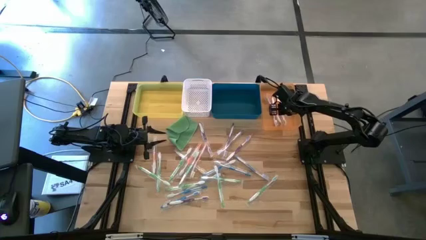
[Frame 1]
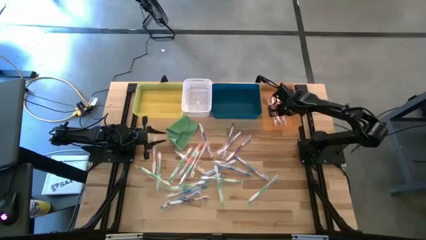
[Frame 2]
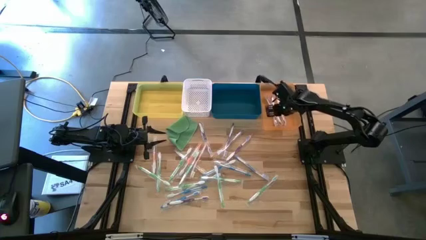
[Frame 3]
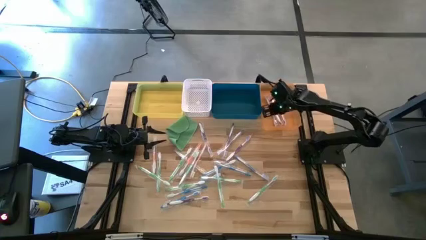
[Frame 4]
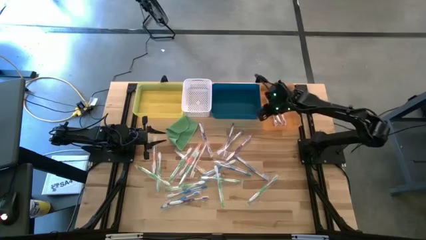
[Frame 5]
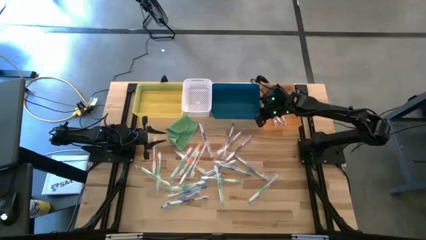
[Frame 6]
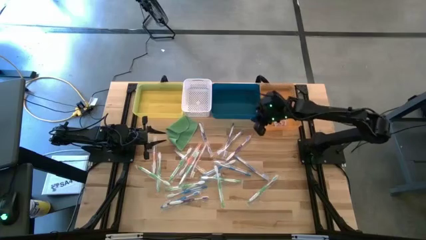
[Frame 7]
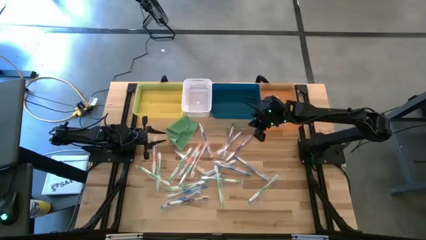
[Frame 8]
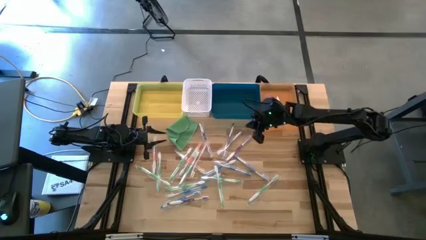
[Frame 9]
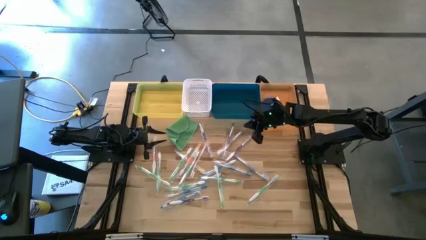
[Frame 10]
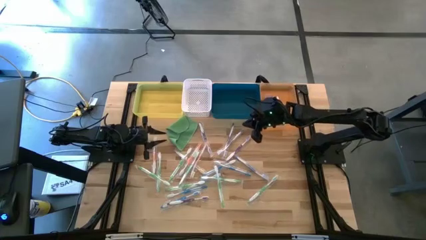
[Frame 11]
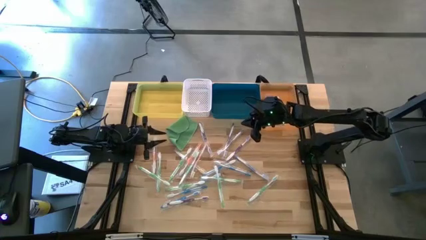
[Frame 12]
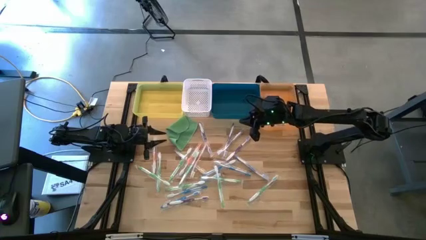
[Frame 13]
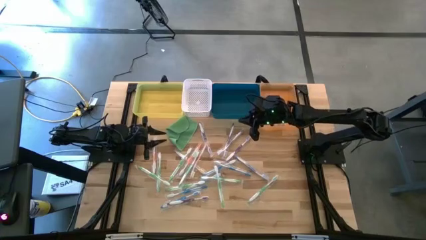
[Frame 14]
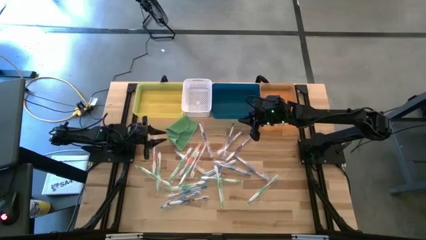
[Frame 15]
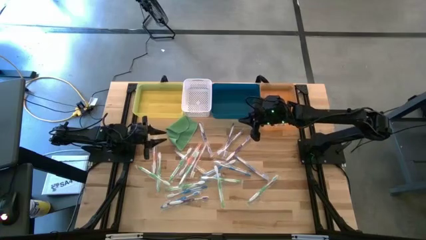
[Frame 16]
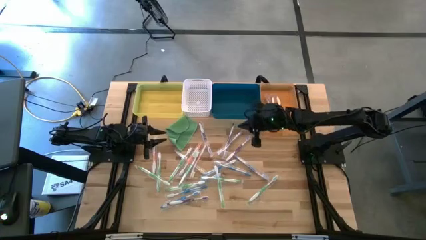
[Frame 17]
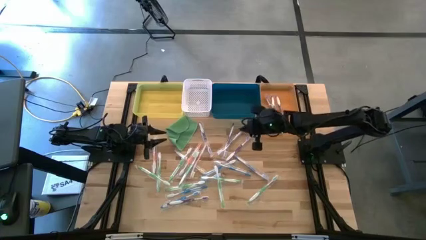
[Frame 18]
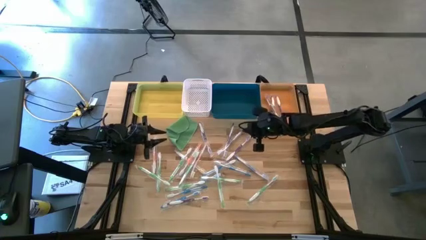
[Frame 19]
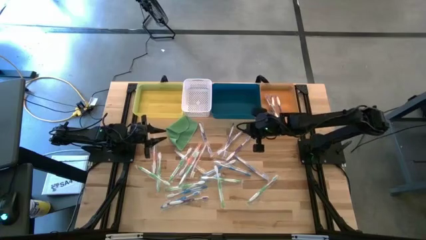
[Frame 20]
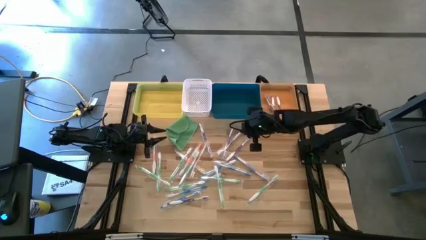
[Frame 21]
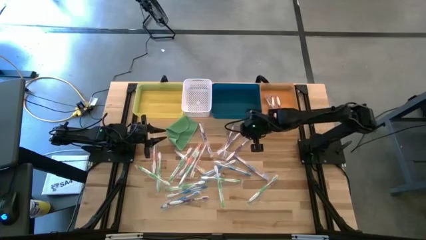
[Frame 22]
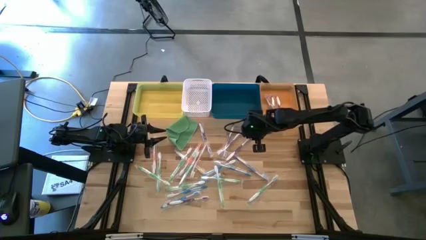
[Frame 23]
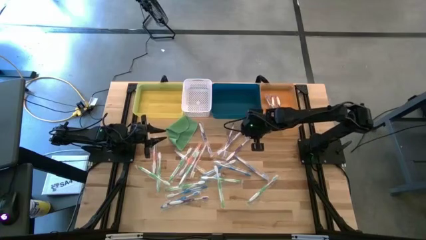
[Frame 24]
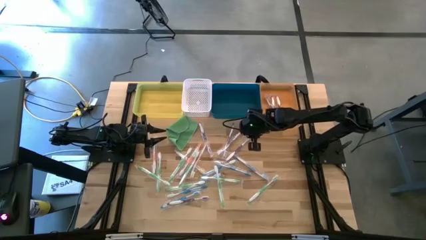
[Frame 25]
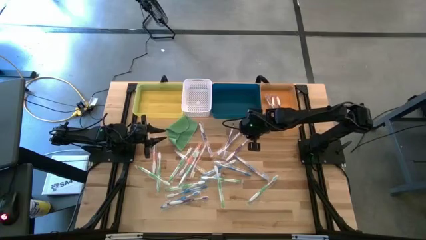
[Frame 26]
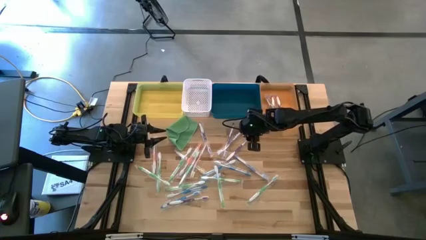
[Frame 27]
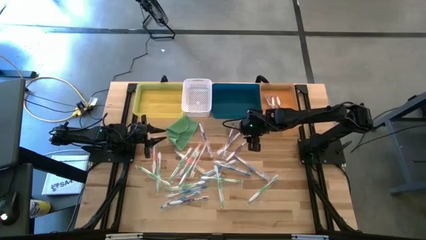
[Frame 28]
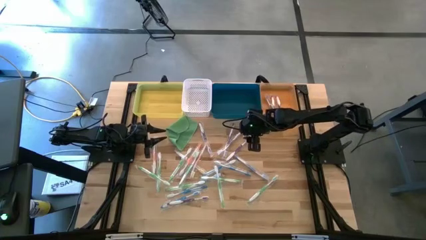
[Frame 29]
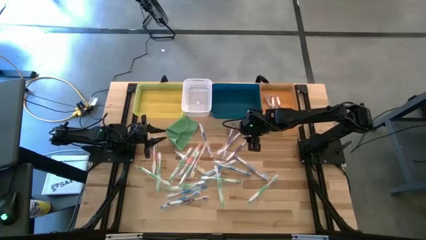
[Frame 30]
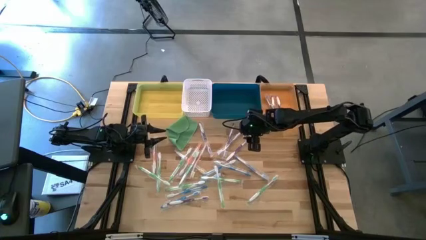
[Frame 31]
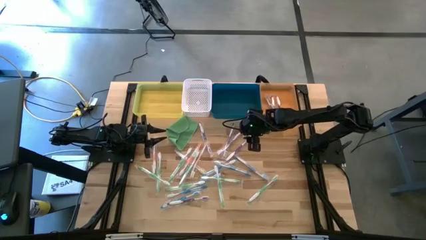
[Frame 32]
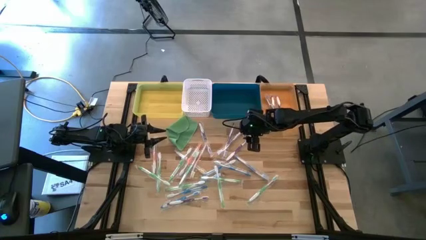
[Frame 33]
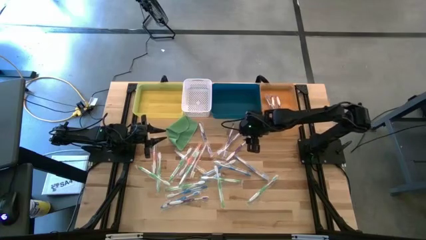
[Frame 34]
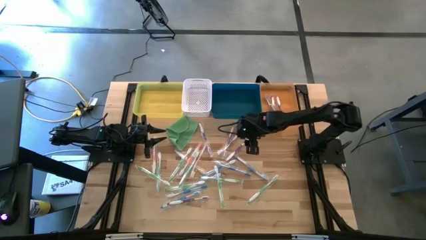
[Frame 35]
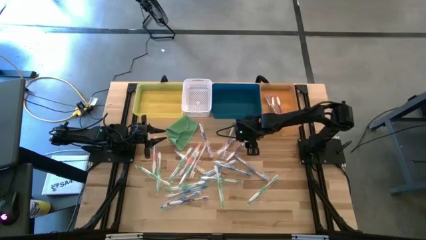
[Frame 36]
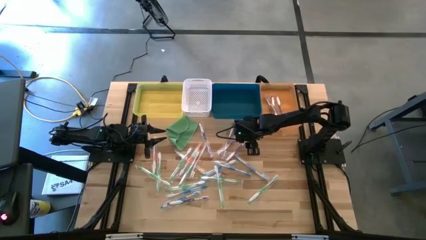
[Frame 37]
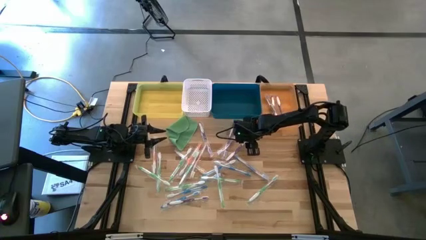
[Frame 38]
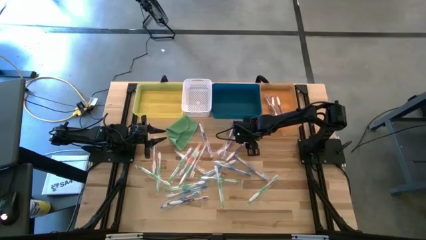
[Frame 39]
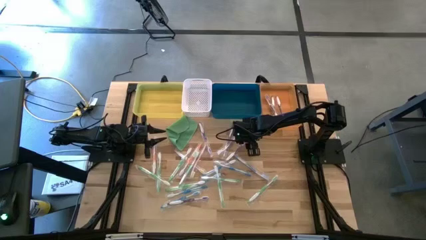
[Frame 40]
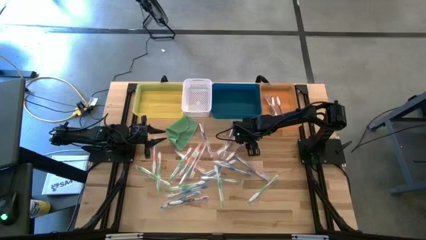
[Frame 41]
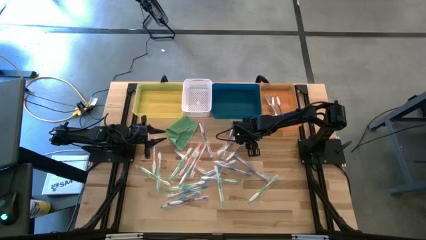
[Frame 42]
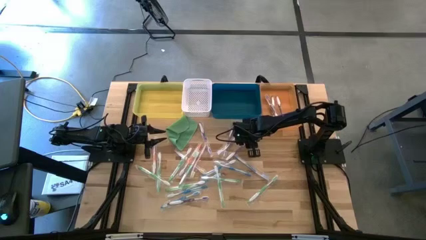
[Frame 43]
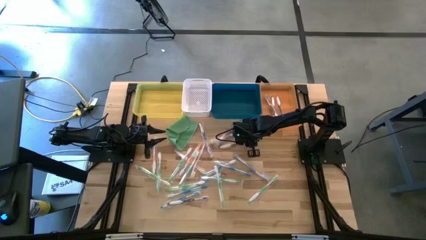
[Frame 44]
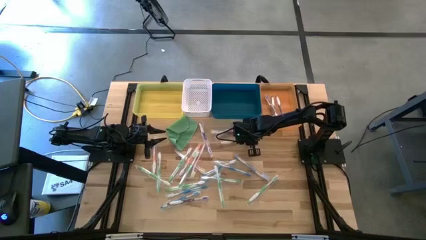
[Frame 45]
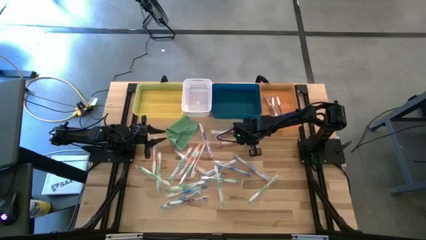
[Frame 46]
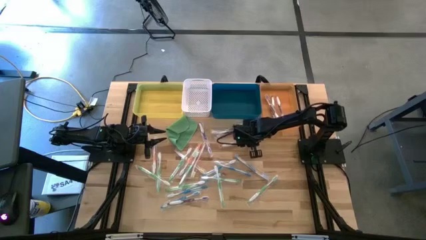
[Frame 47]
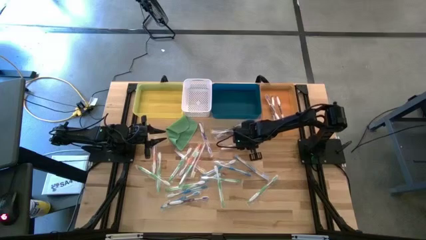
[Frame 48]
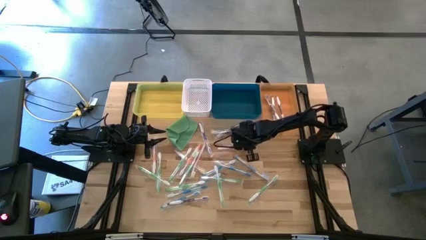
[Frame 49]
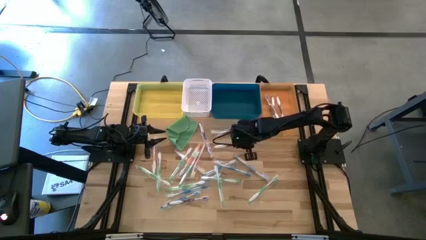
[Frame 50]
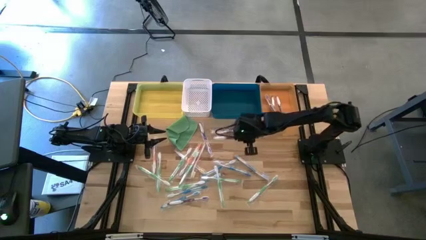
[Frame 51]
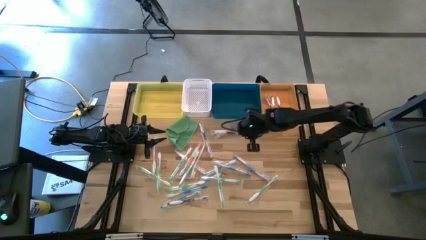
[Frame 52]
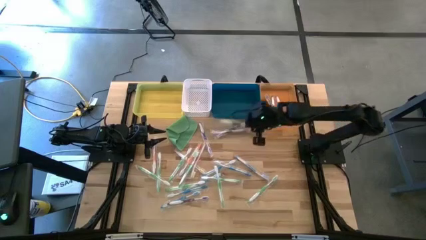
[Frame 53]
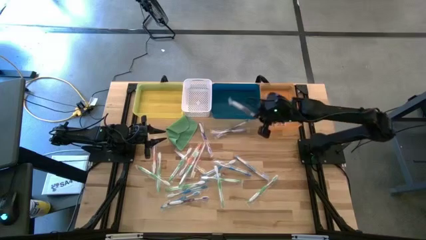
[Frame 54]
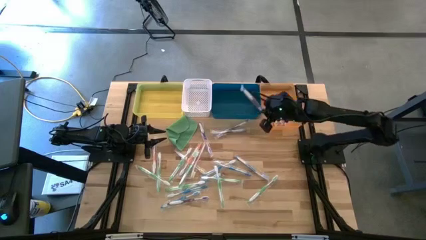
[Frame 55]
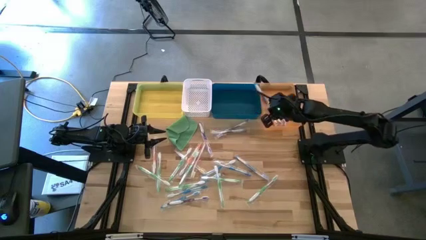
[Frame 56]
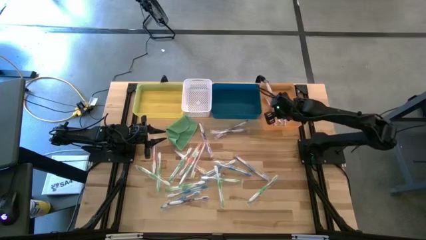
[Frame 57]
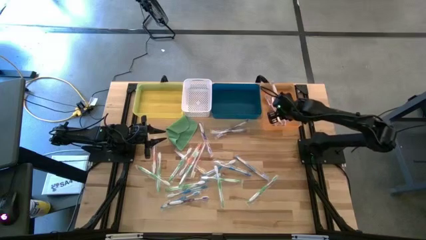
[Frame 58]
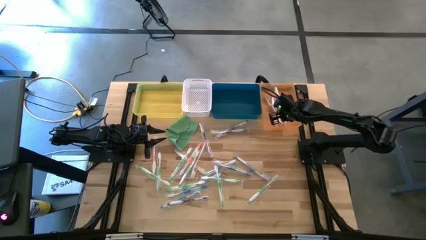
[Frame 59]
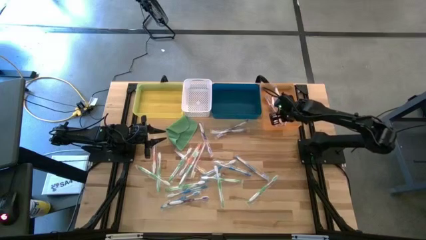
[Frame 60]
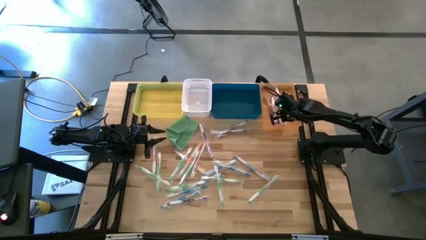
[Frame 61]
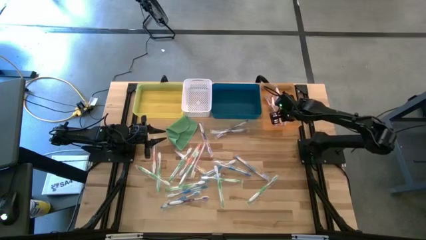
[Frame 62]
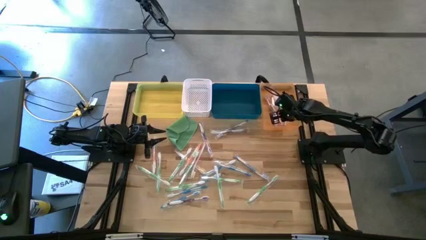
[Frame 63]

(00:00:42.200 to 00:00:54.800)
Task: Pick & Place Toothbrushes
Put the violet toothbrush into the orange bin
